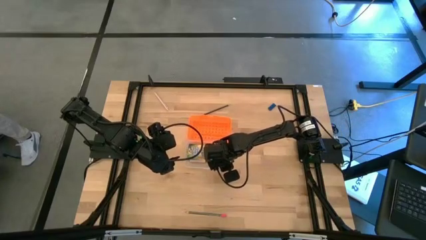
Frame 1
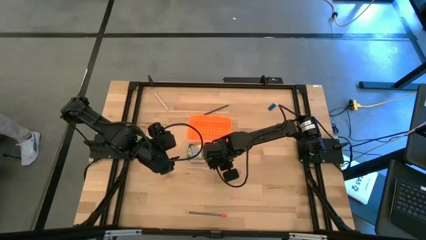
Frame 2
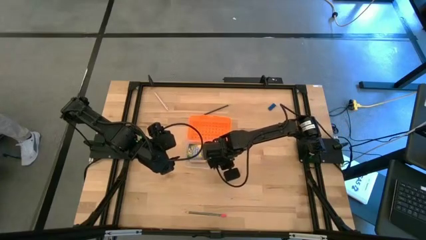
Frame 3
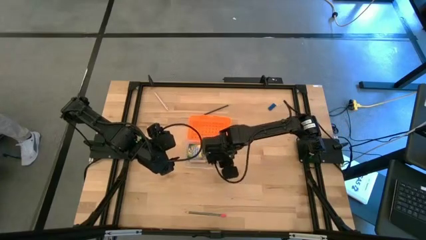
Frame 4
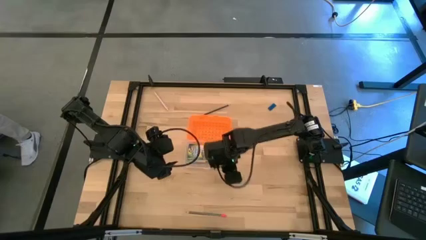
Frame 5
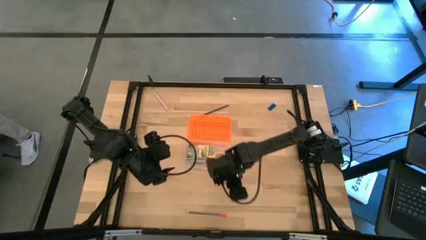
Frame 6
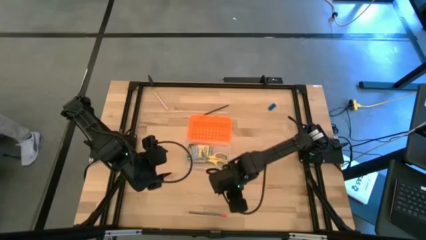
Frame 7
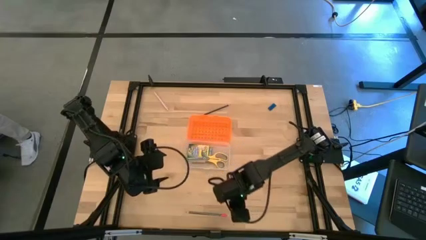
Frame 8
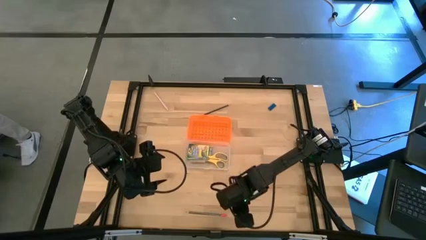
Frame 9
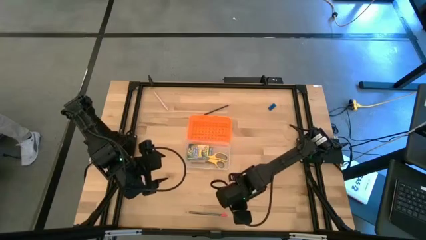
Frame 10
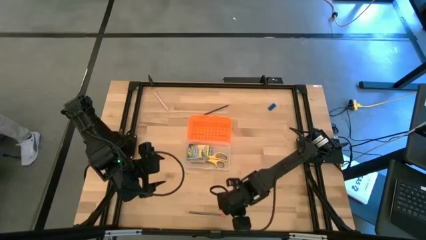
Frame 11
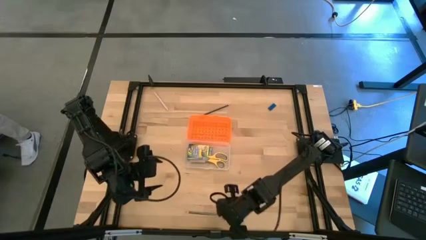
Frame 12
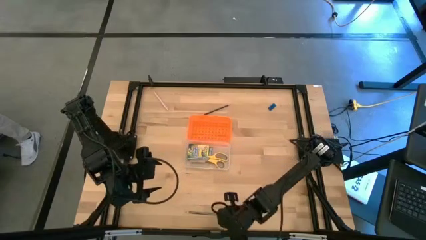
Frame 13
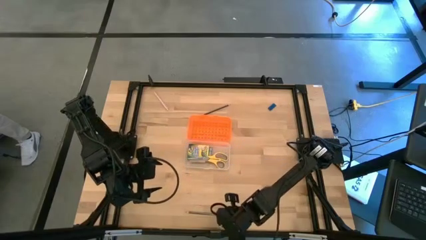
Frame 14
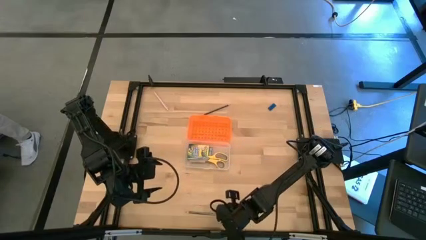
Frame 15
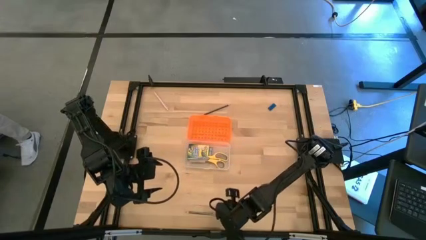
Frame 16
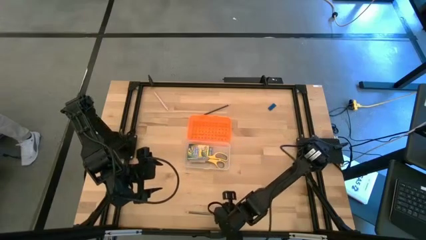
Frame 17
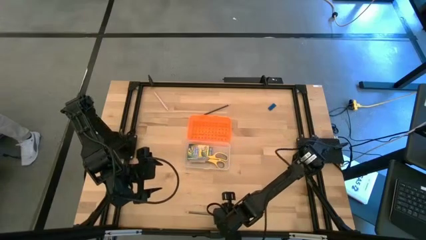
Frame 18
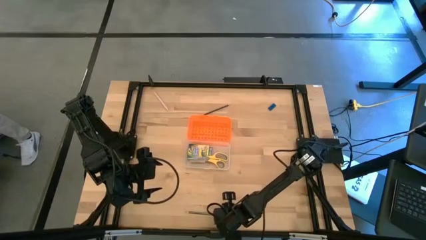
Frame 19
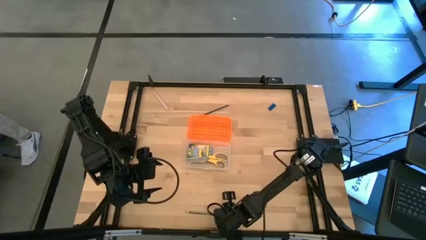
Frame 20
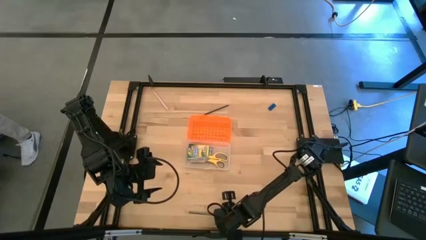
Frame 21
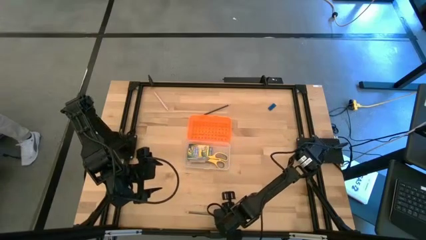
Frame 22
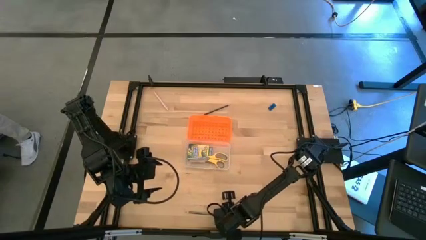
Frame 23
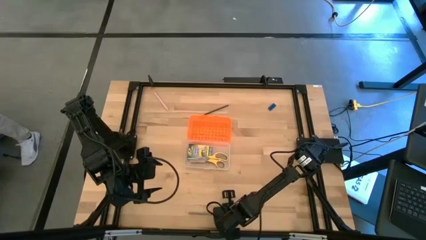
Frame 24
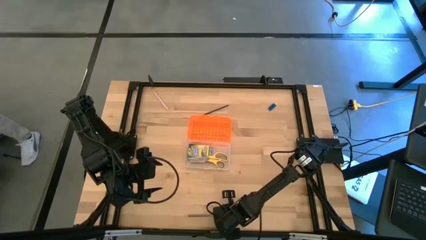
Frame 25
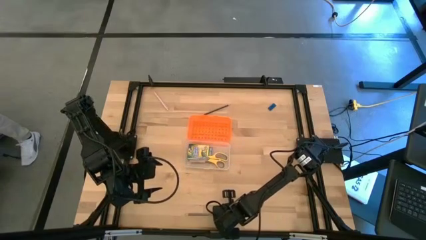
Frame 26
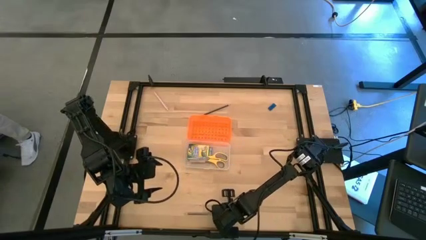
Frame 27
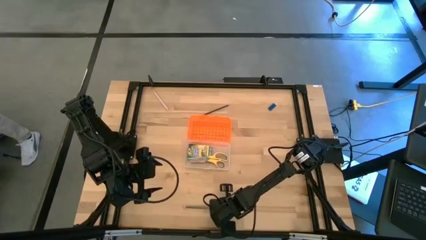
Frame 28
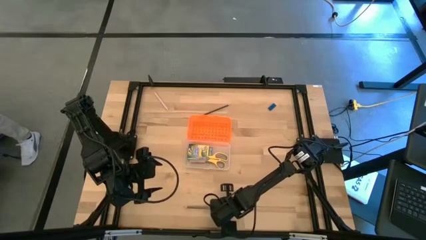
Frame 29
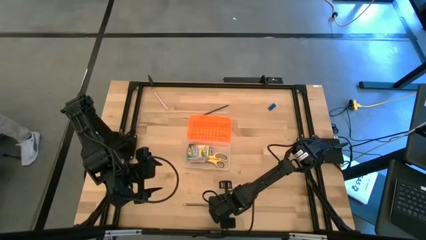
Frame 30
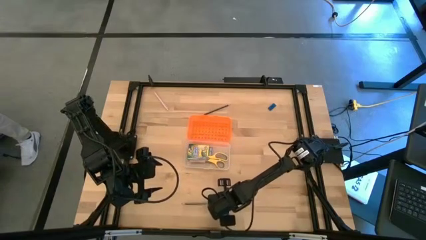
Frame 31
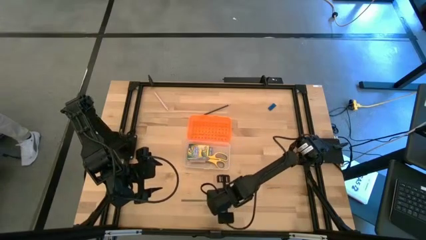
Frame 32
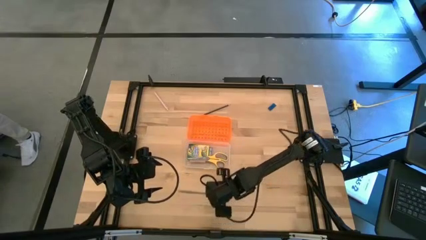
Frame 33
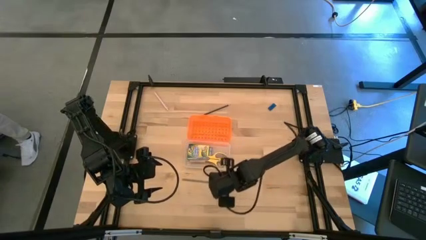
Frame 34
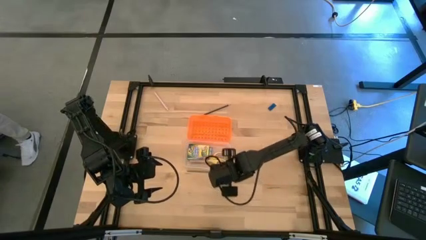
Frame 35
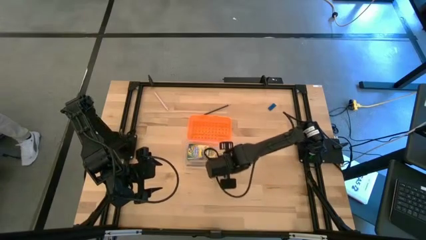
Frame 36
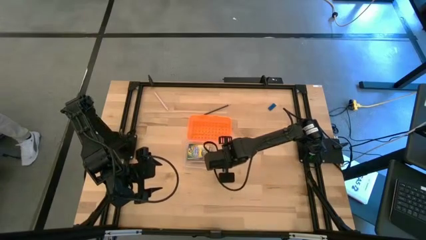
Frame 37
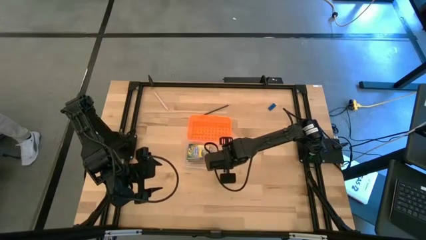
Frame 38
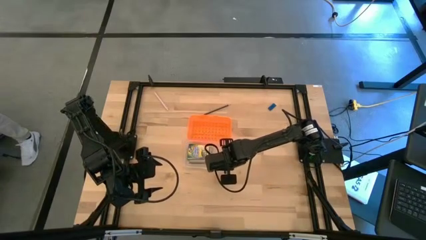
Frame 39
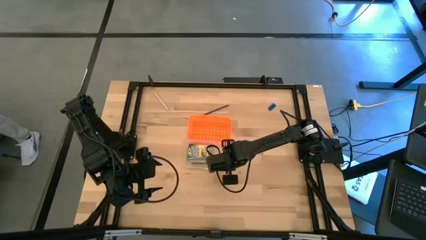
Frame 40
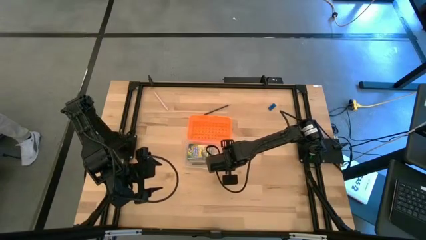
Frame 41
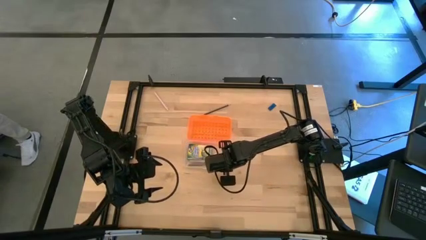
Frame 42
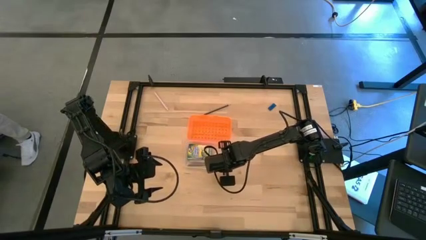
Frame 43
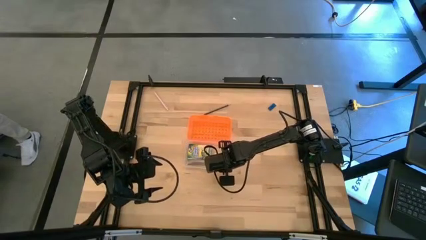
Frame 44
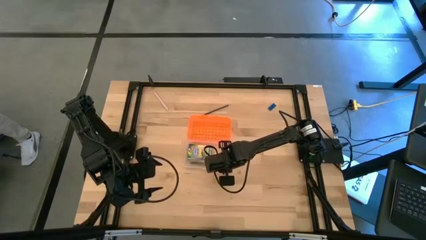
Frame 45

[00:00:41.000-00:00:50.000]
Task: Pack school essentials
Put the black pencil into the supply box

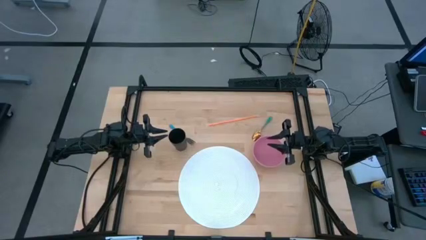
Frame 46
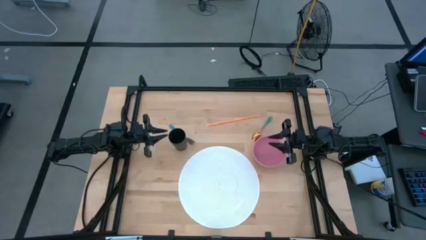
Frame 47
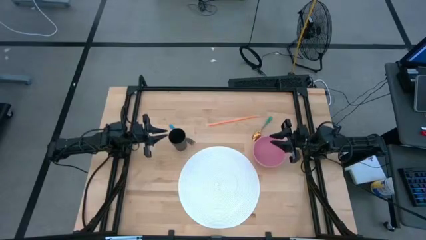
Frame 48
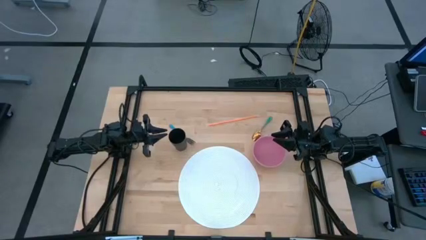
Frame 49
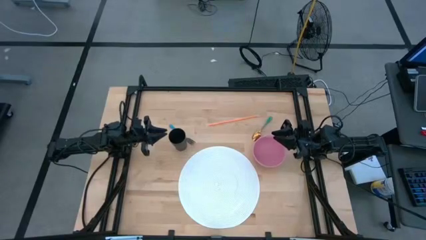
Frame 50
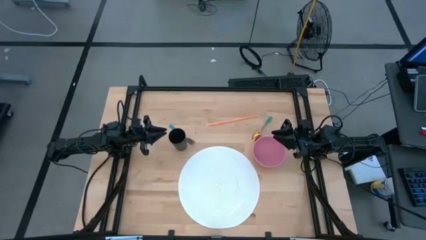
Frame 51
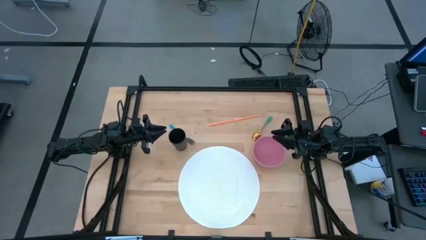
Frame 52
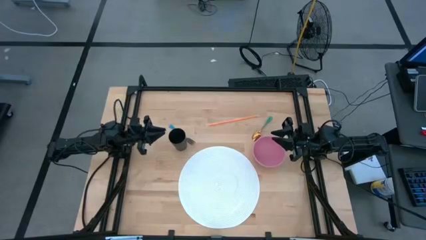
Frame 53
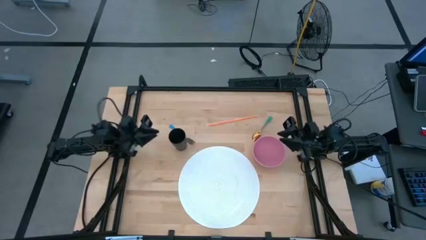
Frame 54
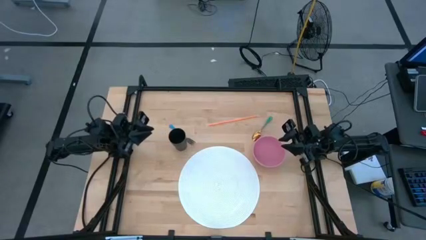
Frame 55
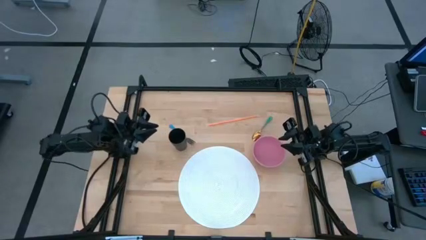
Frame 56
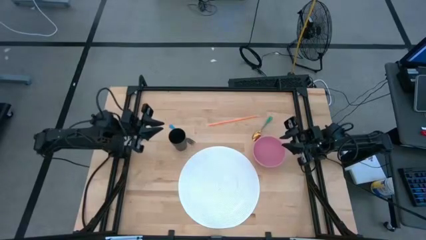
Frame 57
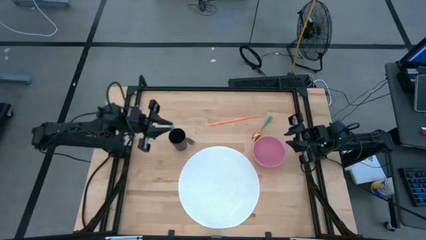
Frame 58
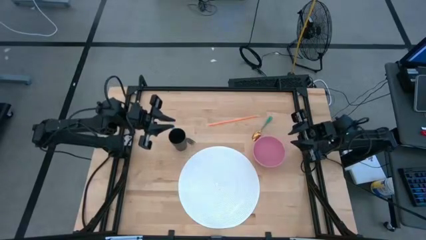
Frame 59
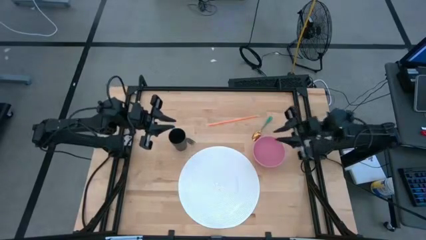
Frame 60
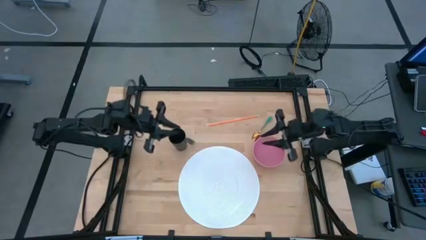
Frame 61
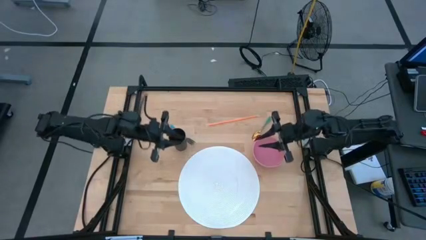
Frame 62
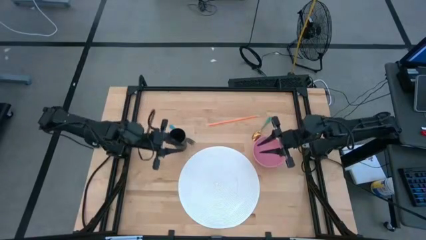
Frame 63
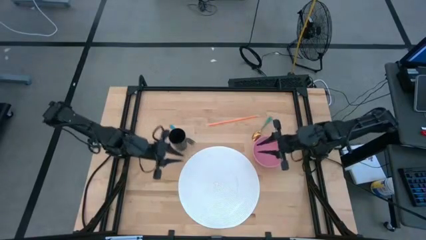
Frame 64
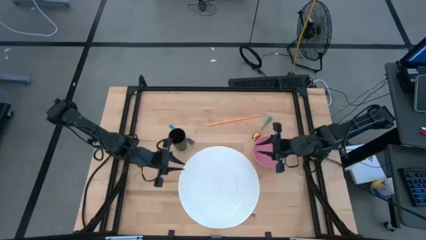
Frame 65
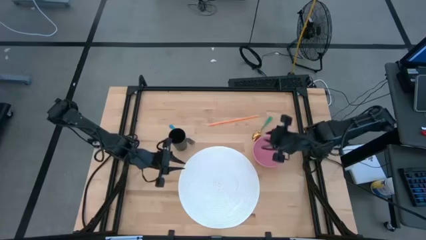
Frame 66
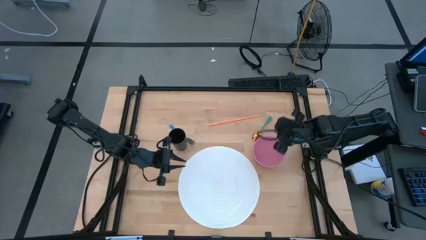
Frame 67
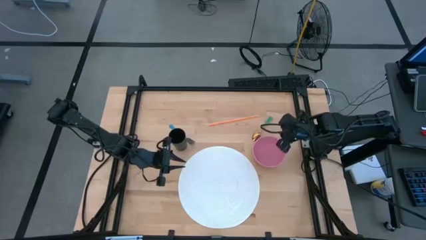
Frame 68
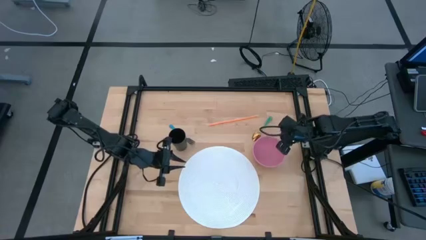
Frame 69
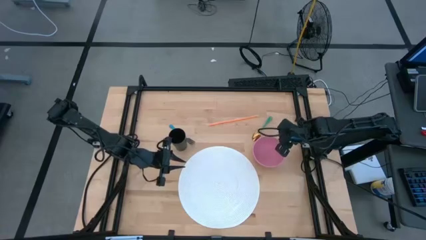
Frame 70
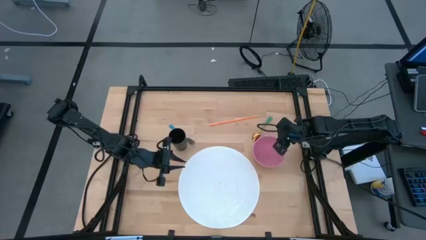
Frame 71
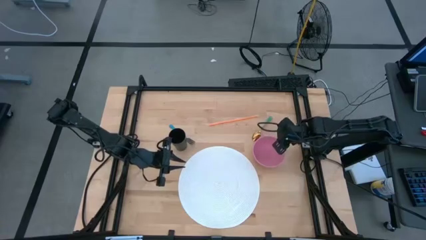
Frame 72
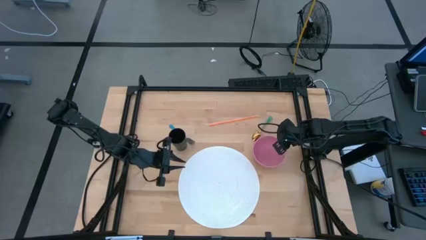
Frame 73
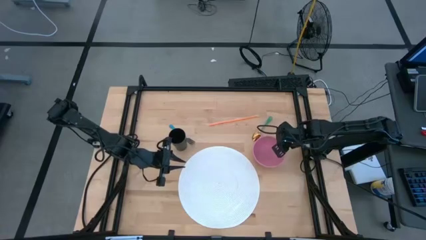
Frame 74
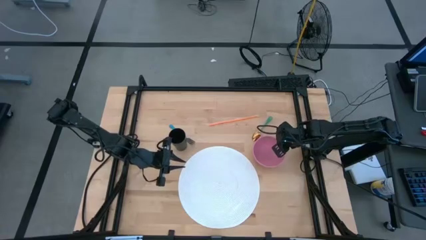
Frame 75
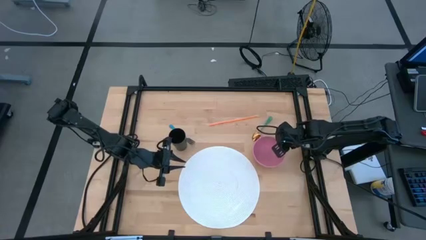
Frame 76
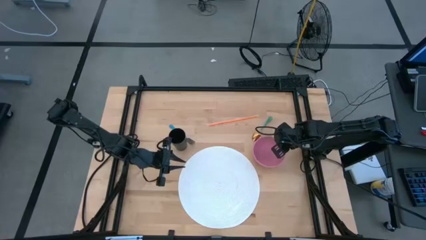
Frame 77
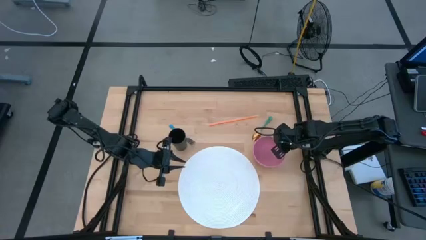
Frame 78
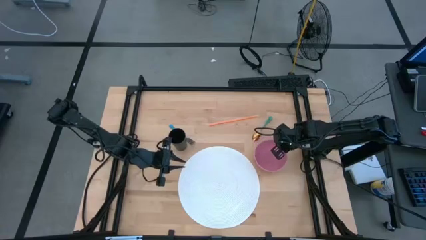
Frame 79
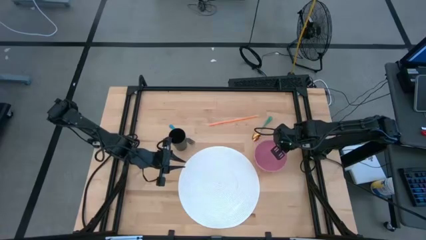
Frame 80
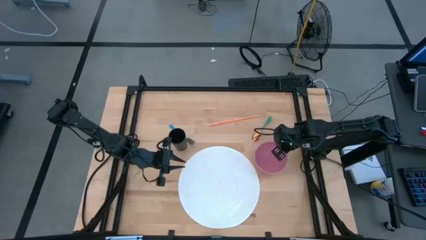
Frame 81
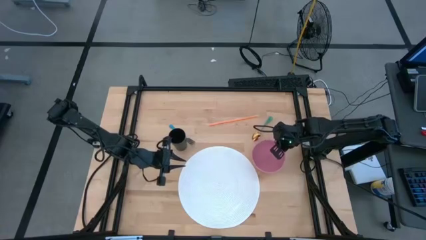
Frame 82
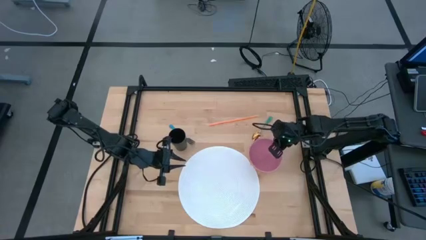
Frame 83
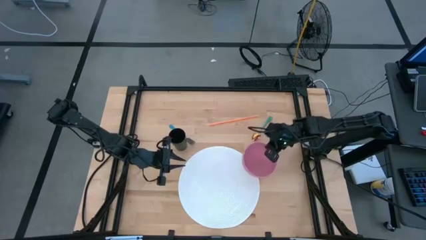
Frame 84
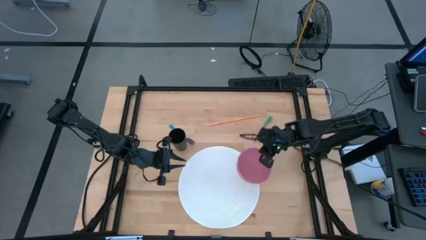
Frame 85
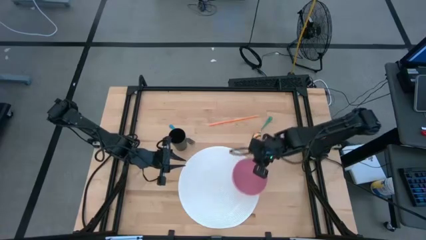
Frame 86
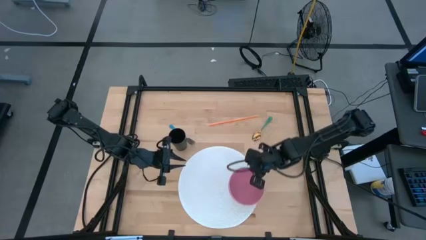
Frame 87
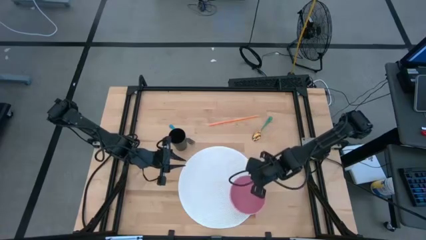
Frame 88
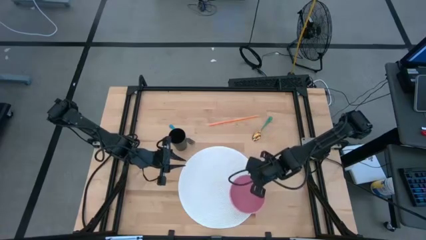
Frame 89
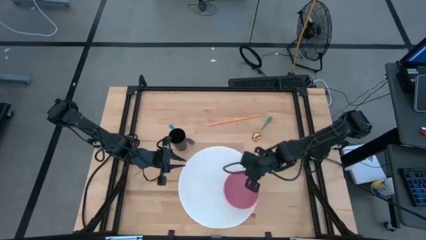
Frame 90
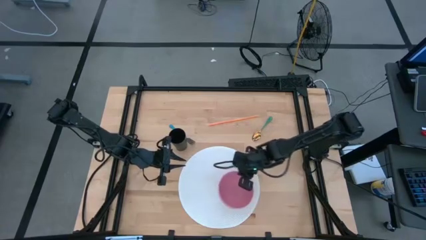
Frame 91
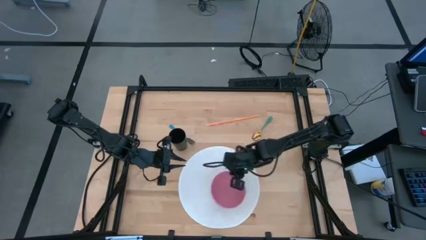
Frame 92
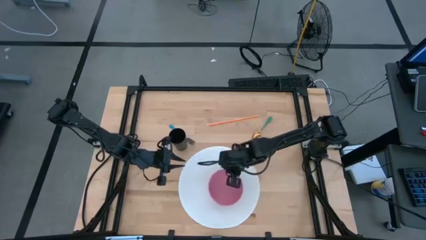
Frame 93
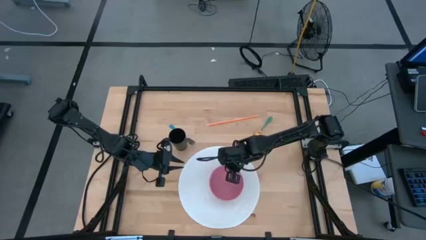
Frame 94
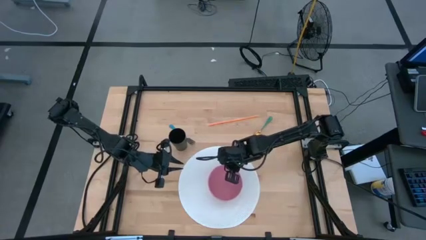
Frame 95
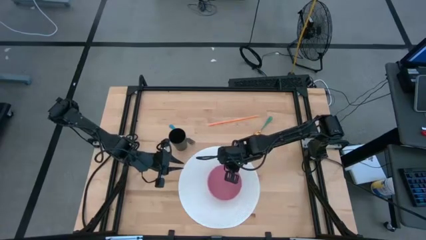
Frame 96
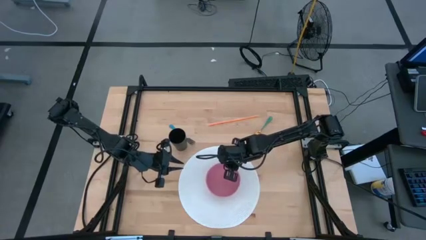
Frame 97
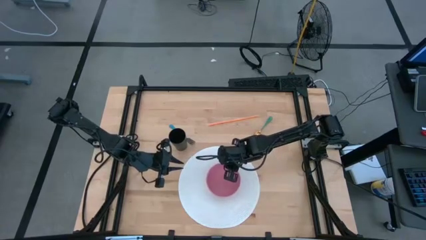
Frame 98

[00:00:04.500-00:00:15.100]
Task: Pick & Place Utensil
Put the pink bowl on the white table mat
